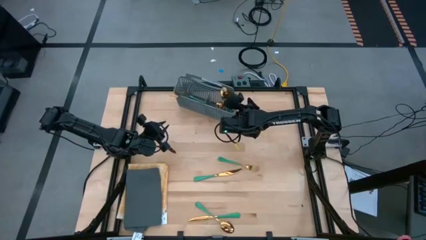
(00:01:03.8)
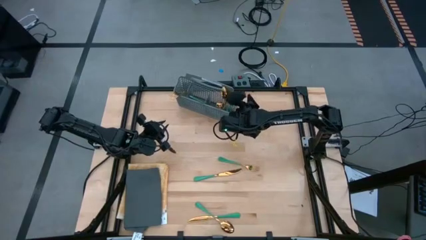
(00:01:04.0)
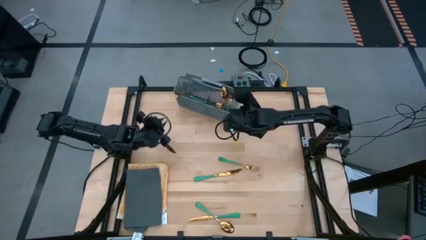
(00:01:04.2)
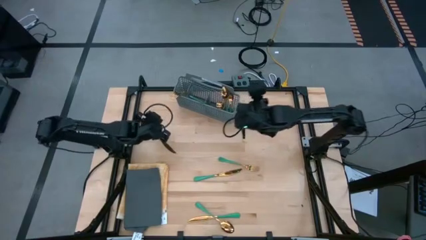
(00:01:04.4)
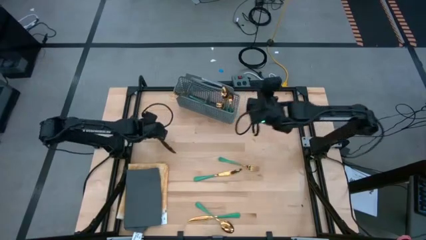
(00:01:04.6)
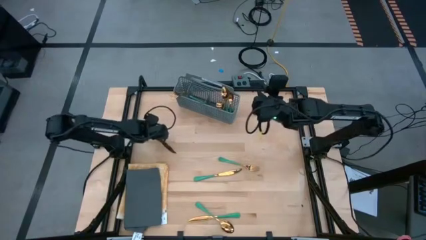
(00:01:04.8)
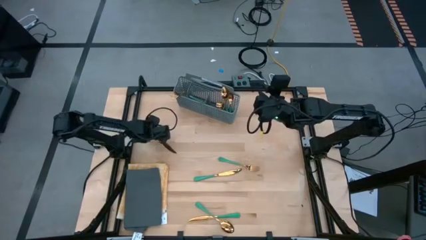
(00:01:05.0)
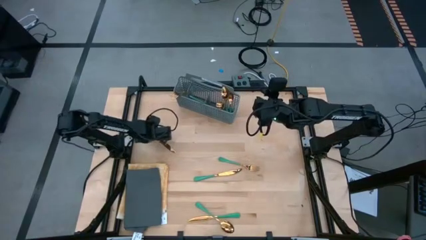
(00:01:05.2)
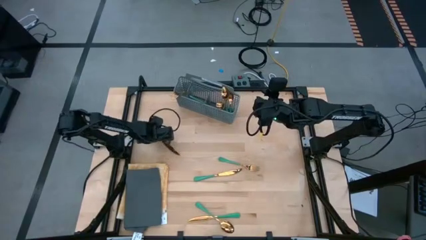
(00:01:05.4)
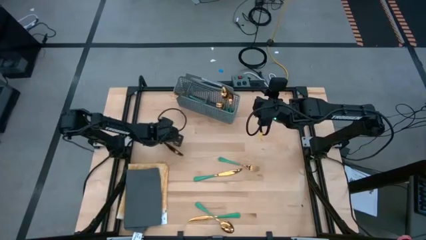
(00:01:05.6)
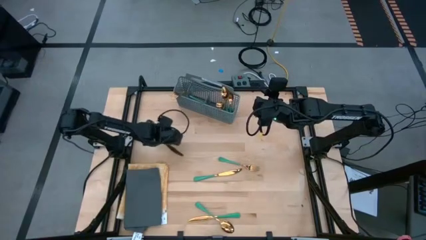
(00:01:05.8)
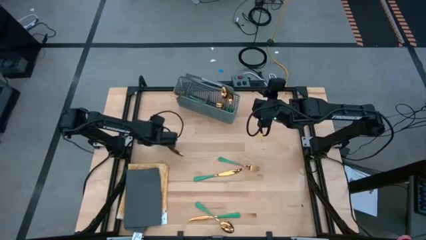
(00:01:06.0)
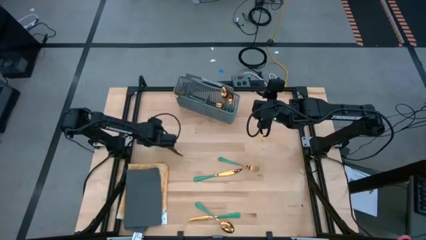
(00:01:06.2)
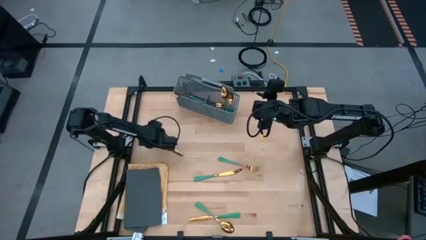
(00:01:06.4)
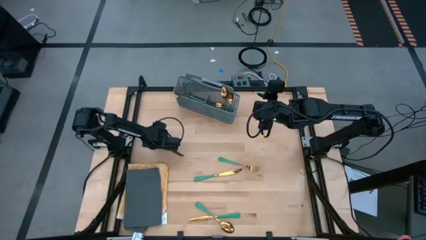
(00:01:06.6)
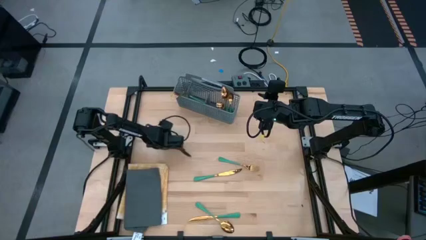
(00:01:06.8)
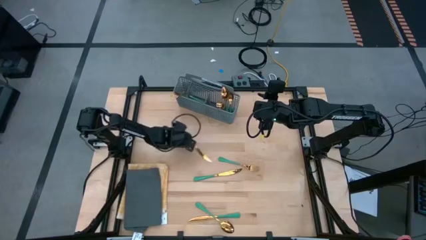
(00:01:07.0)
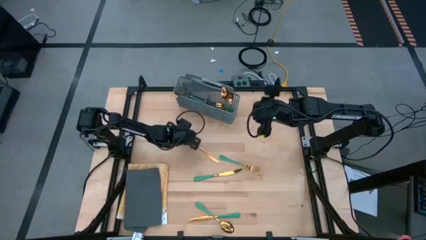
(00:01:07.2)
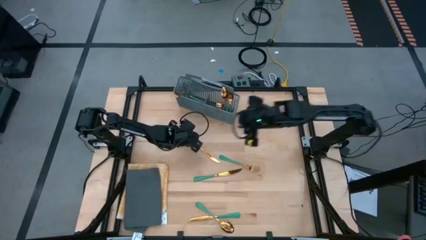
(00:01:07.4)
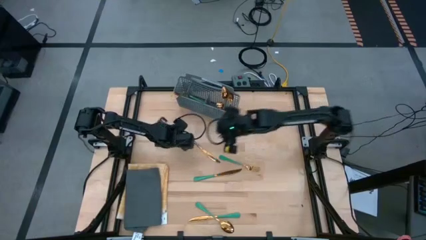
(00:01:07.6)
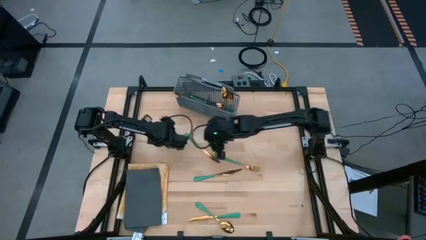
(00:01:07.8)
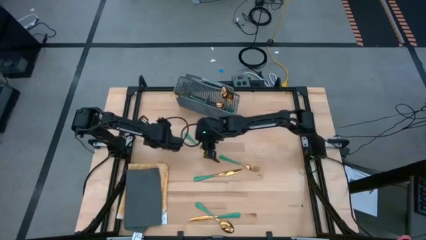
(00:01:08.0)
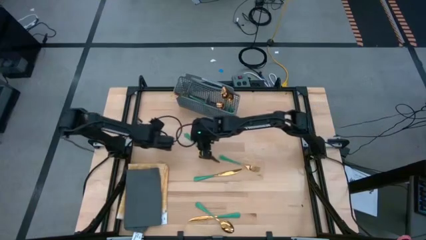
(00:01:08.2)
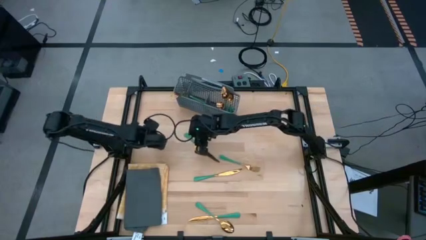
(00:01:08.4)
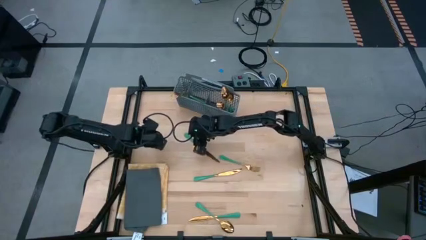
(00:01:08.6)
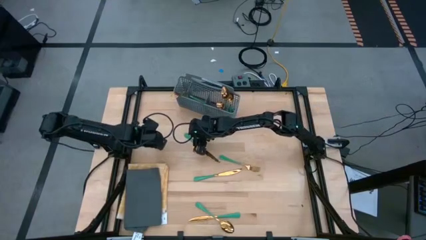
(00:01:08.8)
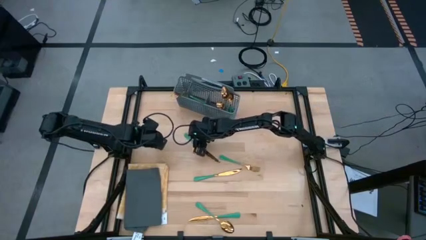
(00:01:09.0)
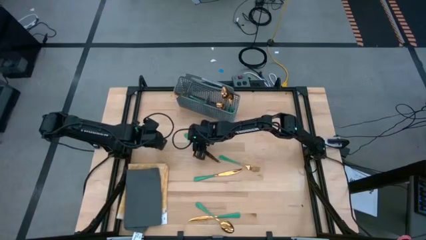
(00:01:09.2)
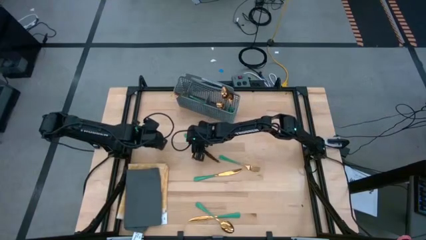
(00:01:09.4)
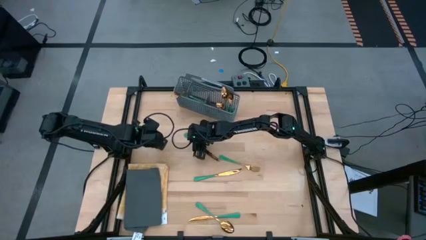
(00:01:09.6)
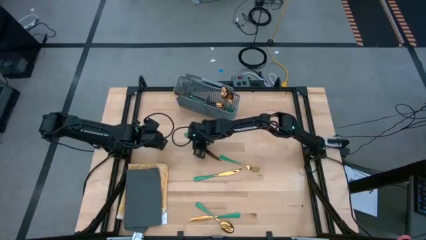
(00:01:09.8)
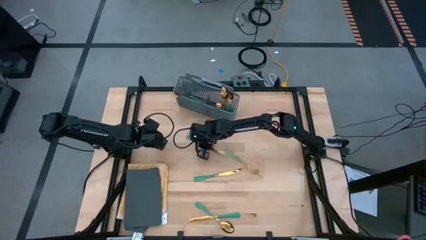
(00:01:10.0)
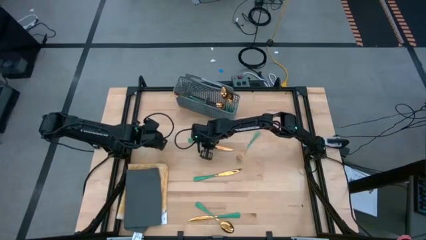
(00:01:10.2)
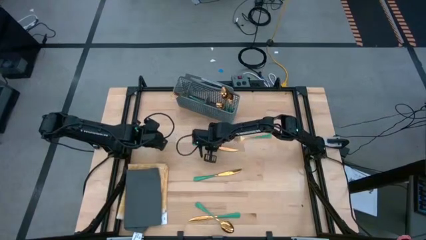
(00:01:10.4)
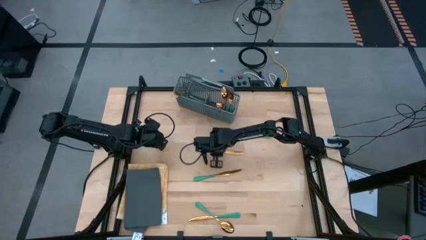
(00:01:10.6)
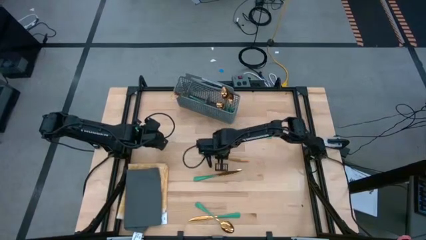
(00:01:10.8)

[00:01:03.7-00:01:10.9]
Task: Sort silverware
Put the green table knife into the gray silverware basket

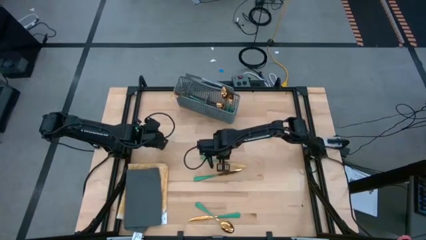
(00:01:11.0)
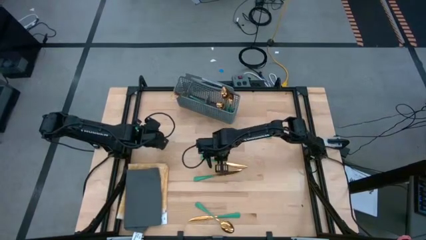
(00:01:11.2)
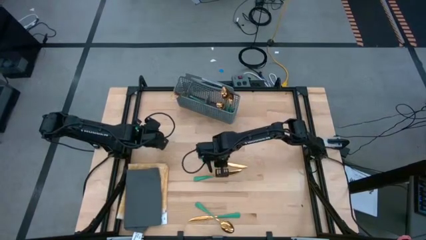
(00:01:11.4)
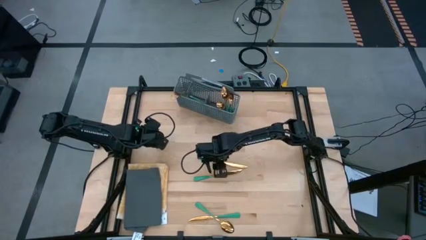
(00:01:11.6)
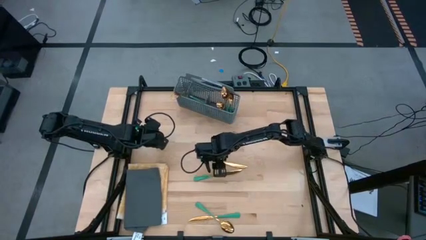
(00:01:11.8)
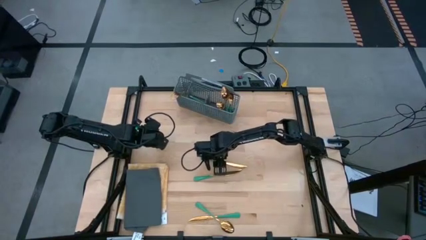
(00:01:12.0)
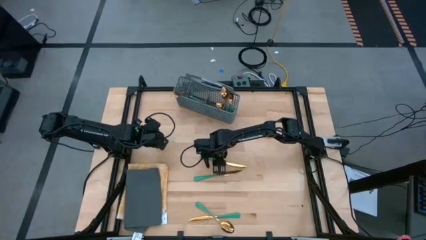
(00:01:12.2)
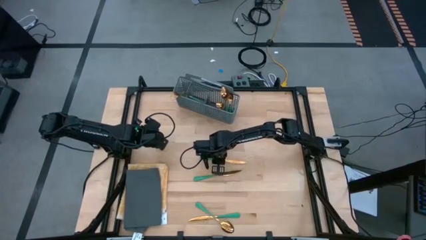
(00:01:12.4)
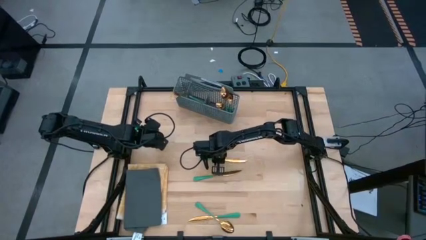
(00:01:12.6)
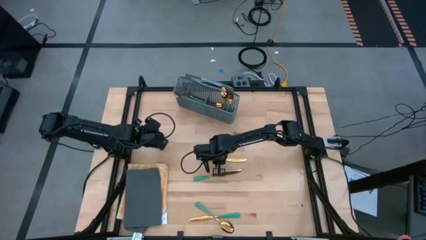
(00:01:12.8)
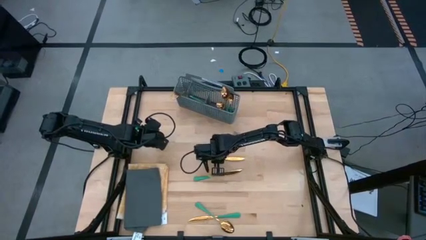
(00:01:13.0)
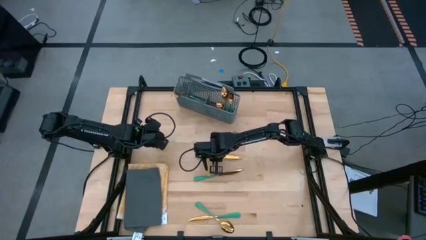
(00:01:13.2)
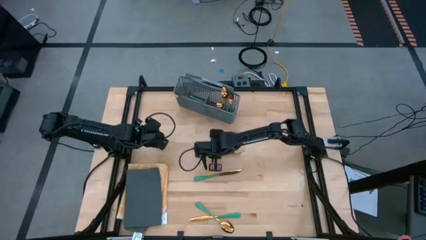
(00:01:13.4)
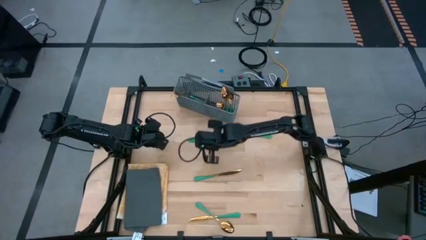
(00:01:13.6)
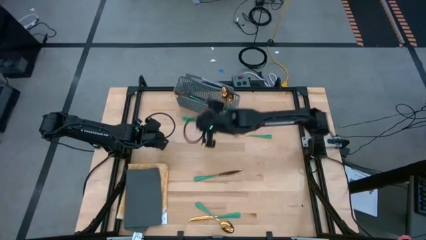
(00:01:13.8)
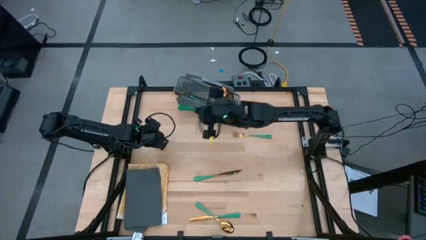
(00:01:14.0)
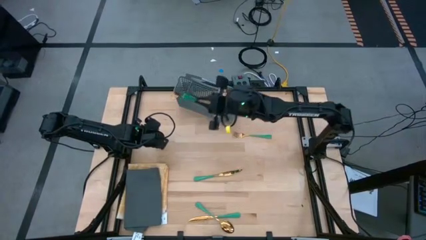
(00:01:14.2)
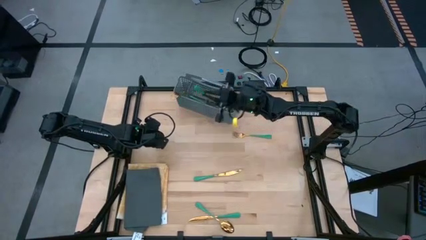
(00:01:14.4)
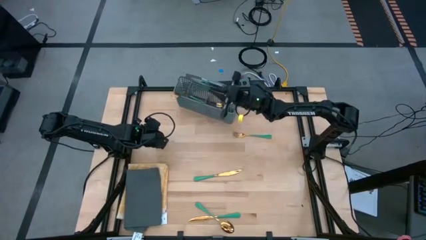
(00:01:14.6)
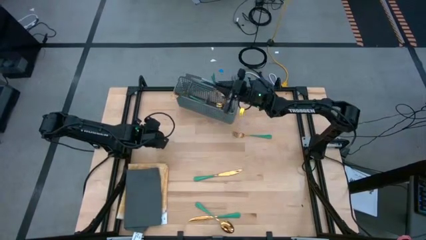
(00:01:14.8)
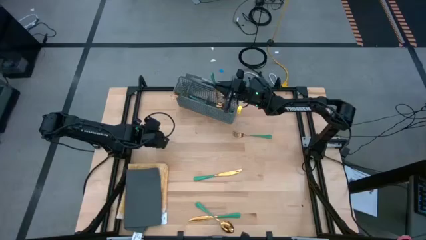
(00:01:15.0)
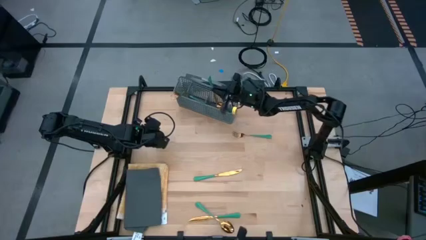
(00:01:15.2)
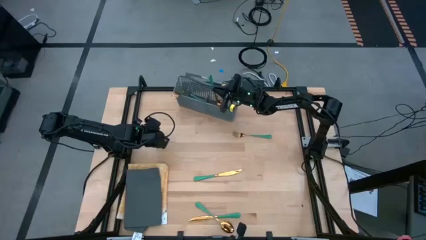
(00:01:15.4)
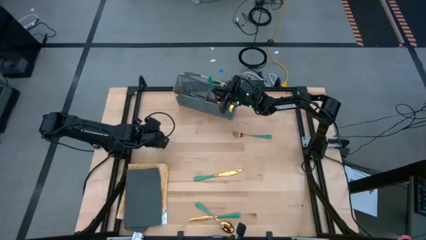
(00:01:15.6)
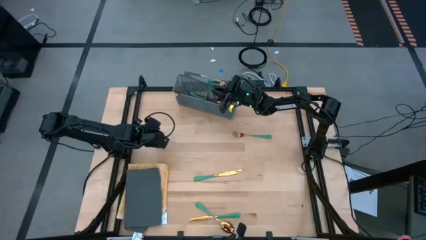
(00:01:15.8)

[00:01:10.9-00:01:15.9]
Put the green table knife into the gray silverware basket

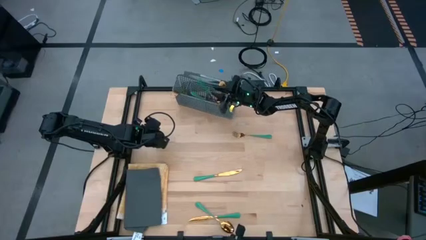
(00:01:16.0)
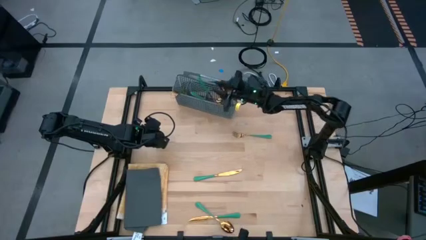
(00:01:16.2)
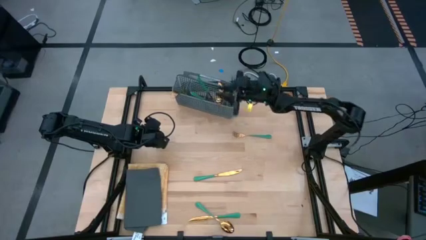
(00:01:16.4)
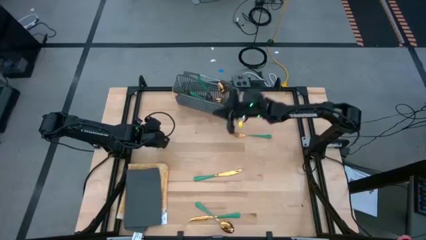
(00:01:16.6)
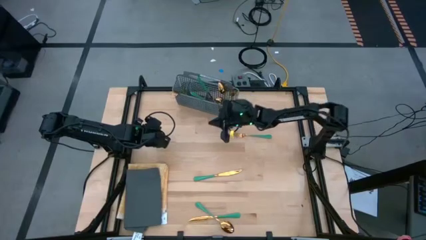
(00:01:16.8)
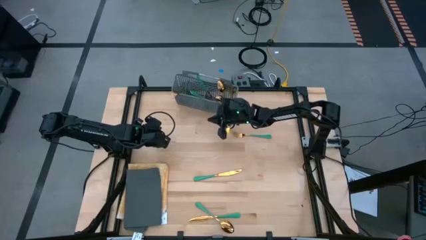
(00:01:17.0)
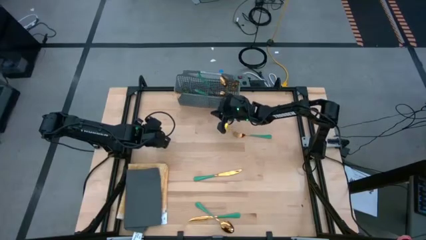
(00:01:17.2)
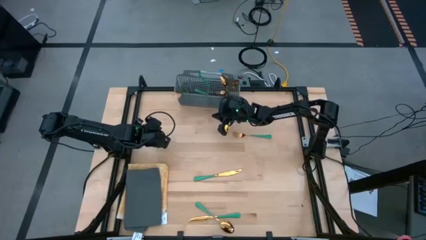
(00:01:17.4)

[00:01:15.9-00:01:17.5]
Adjust the gray silverware basket

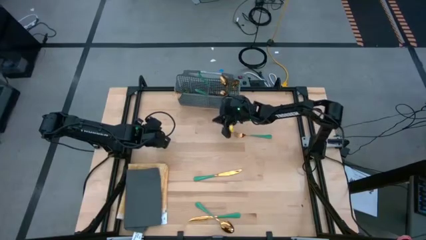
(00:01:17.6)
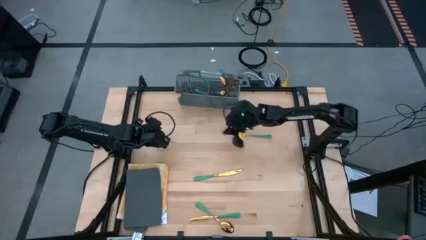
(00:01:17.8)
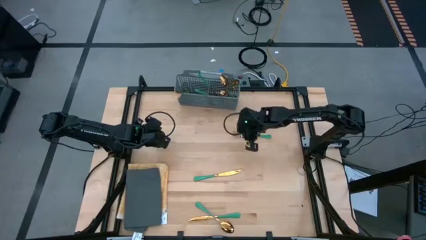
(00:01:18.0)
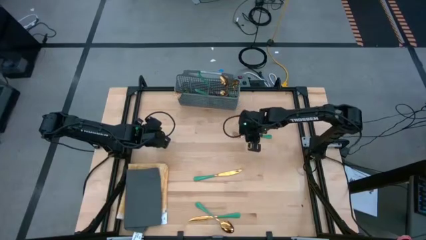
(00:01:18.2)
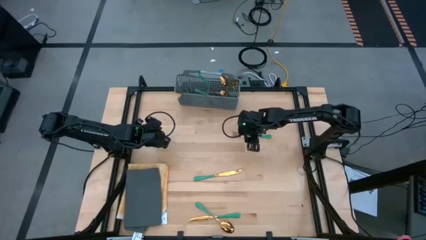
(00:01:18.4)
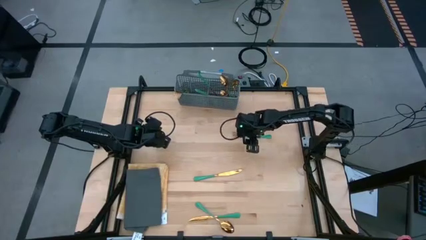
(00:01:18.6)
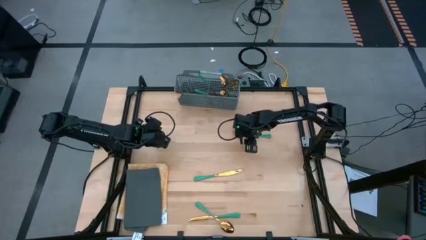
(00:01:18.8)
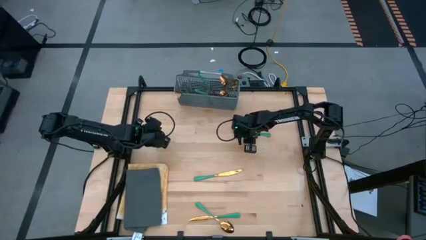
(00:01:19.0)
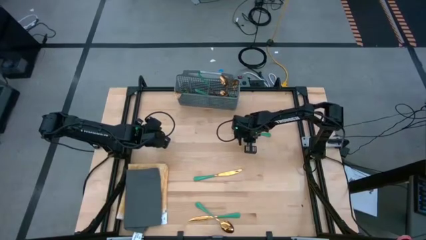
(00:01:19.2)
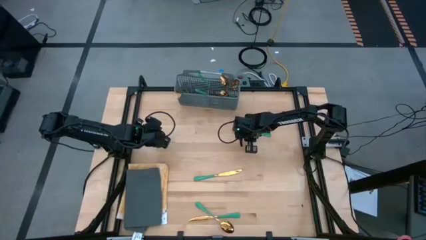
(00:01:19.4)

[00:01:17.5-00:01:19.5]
Put the green fork into the gray silverware basket
